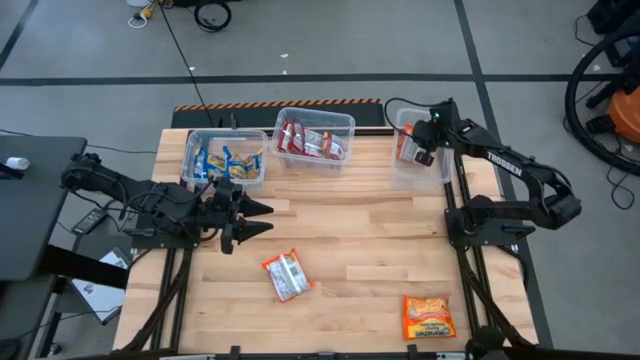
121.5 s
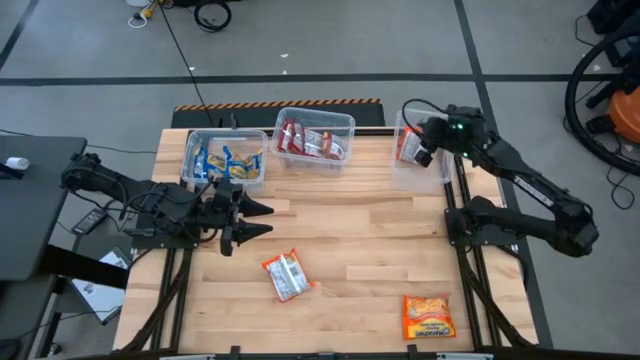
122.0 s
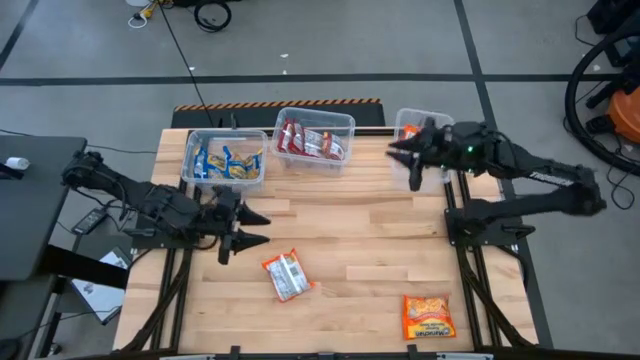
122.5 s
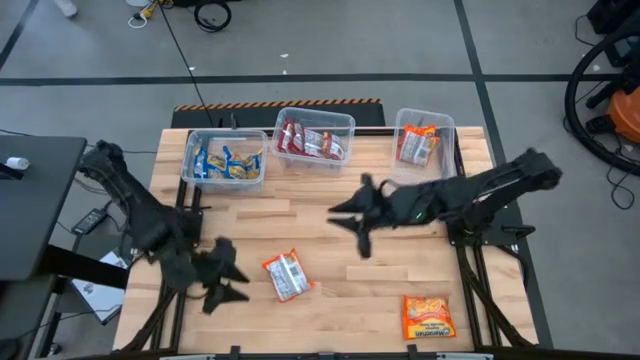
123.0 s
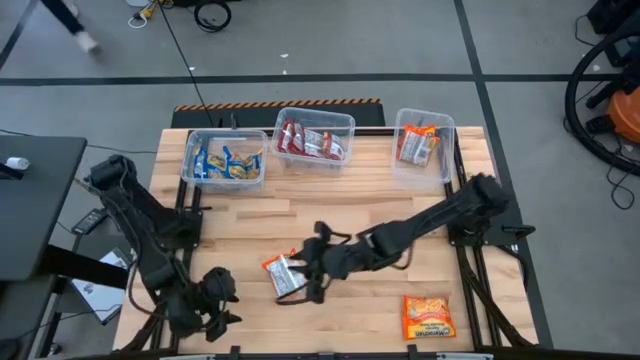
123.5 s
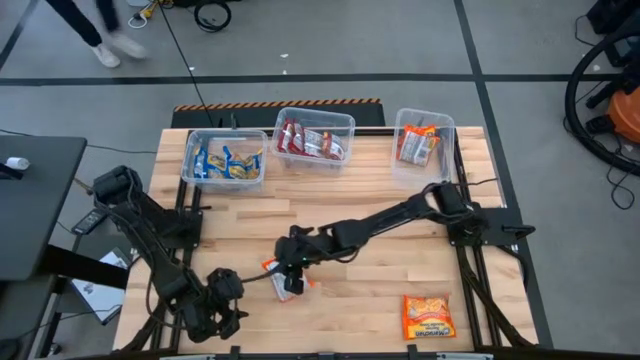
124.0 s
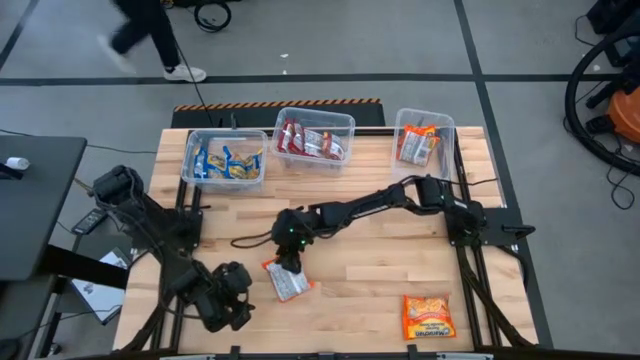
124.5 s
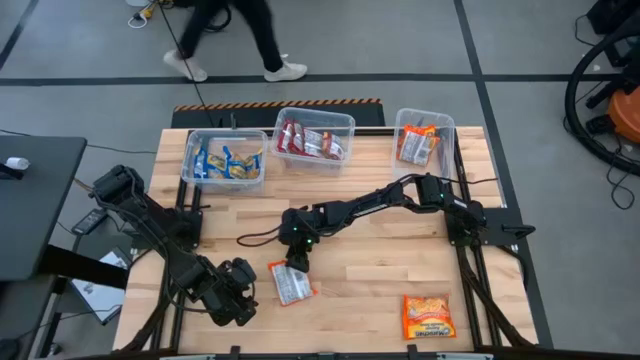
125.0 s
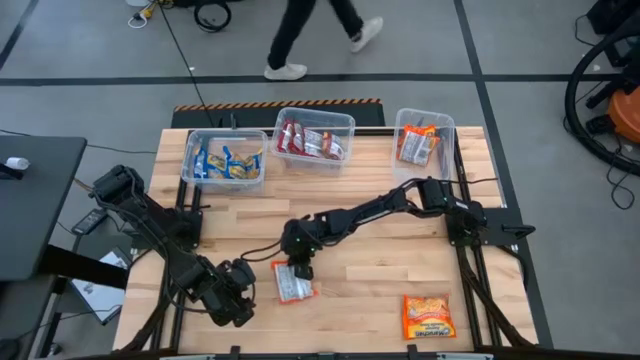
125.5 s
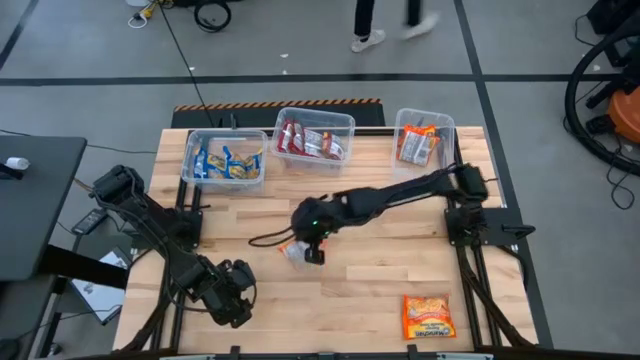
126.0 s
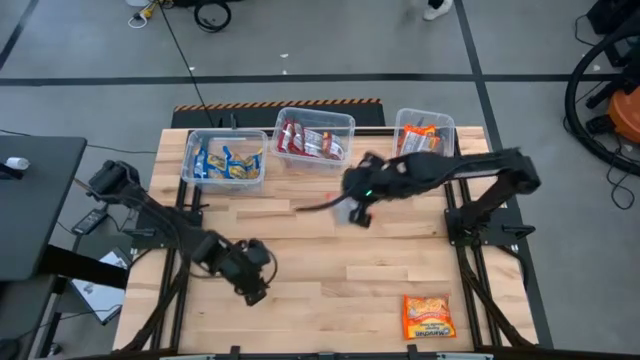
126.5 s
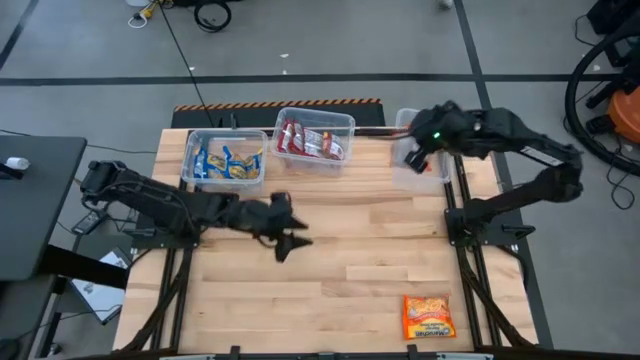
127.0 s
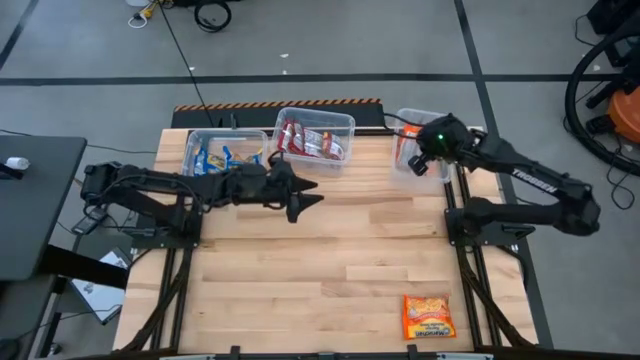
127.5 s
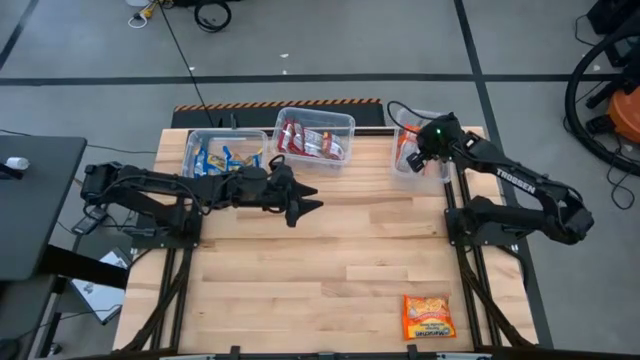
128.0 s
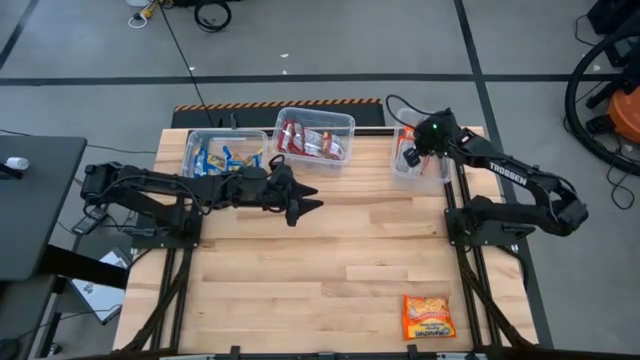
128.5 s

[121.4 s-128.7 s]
Task: Sort Maruchan noodles
Put the left orange noodle pack into the right transparent bin

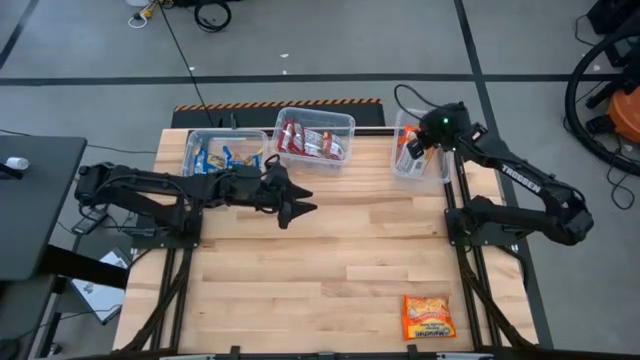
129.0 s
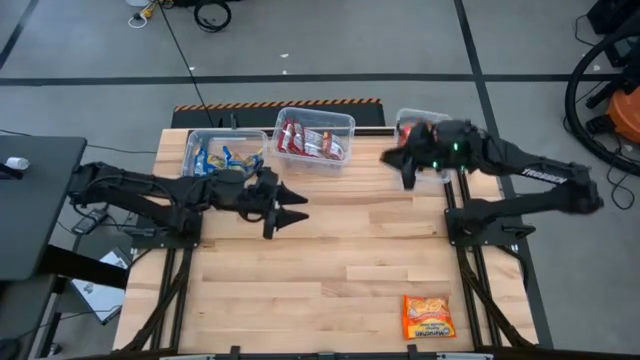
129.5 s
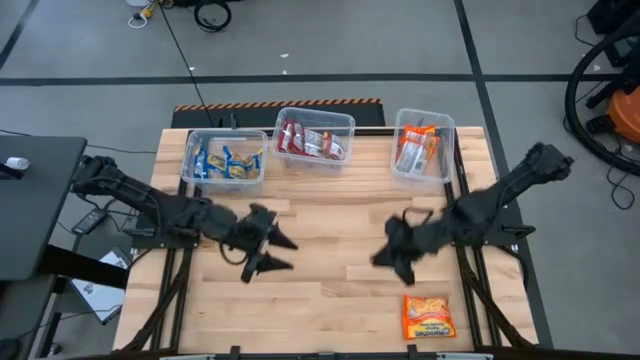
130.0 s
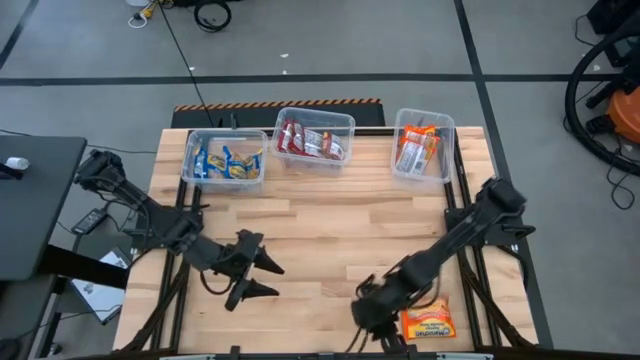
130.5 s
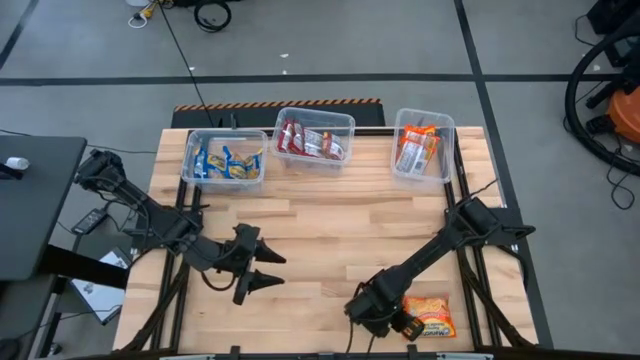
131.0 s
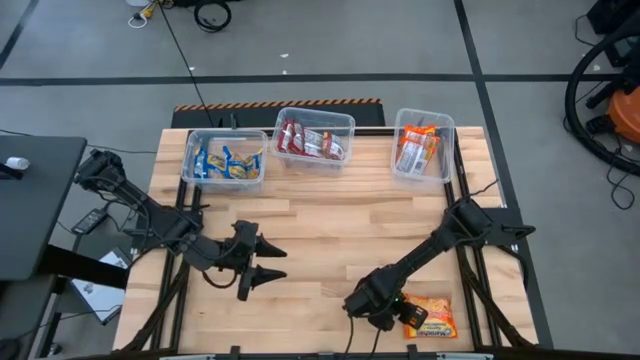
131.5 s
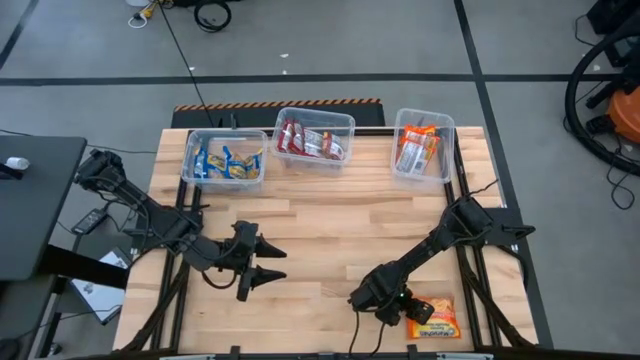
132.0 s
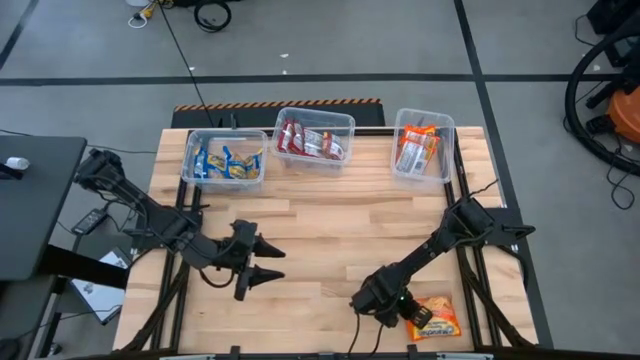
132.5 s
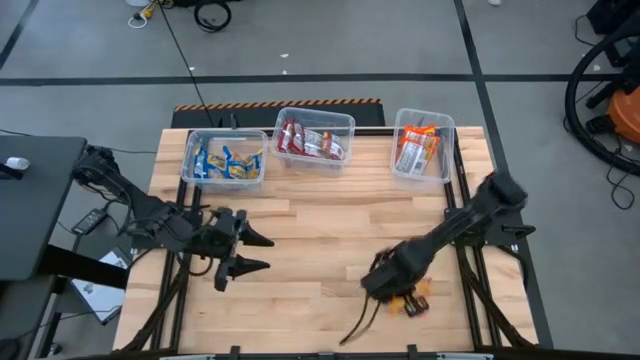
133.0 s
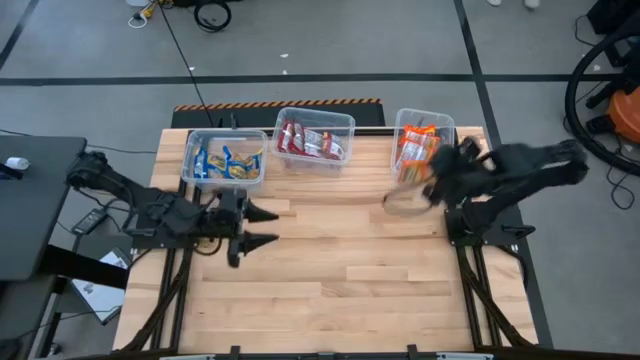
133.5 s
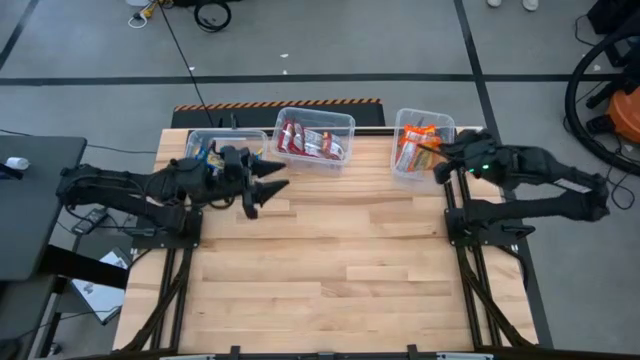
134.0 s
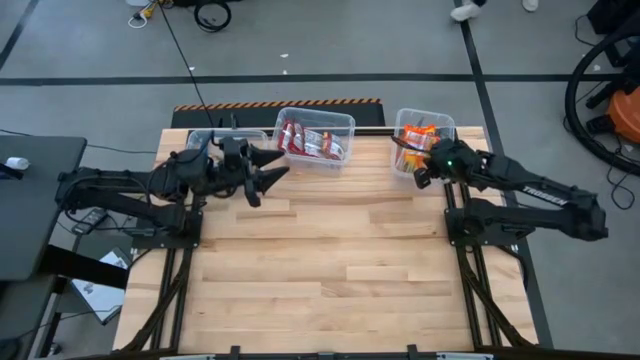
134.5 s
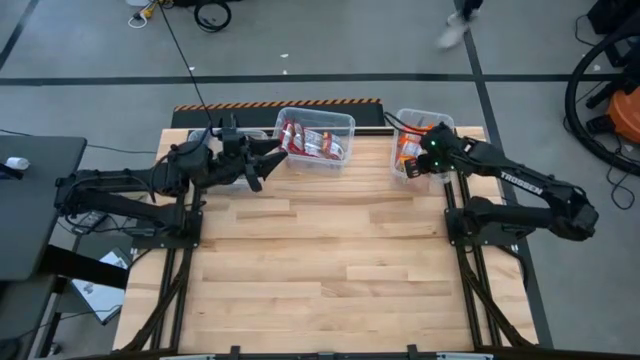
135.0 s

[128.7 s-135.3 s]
Put the right orange noodle pack into the right transparent bin

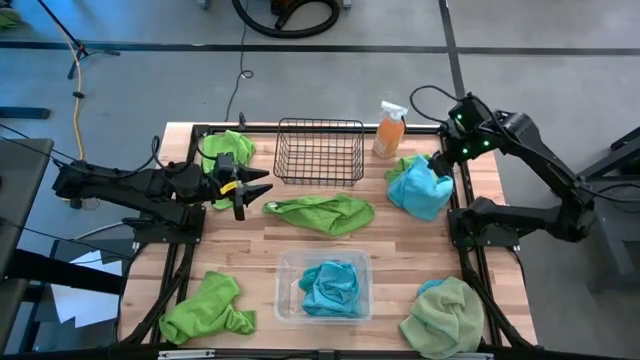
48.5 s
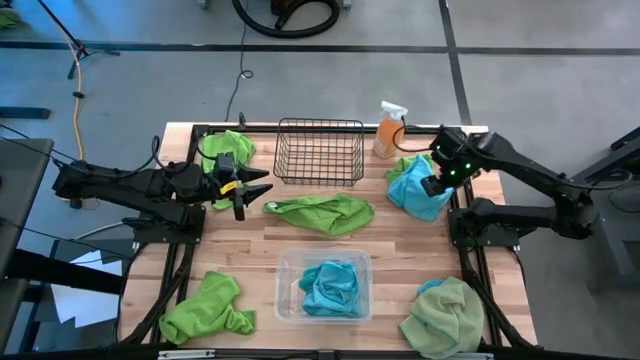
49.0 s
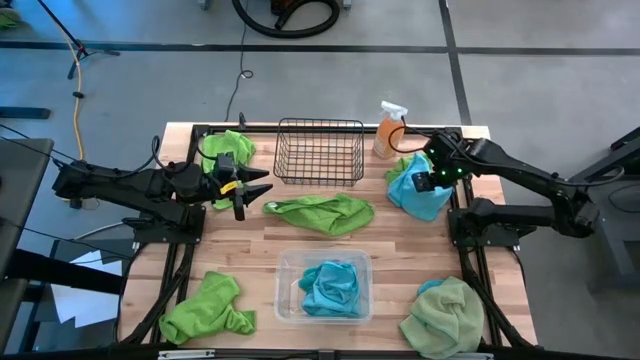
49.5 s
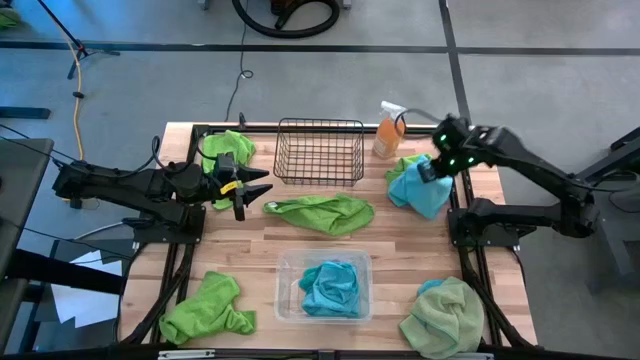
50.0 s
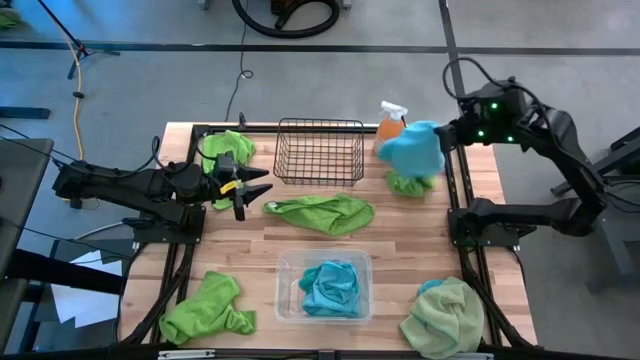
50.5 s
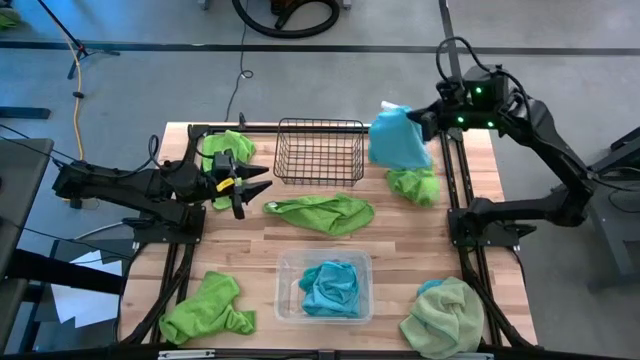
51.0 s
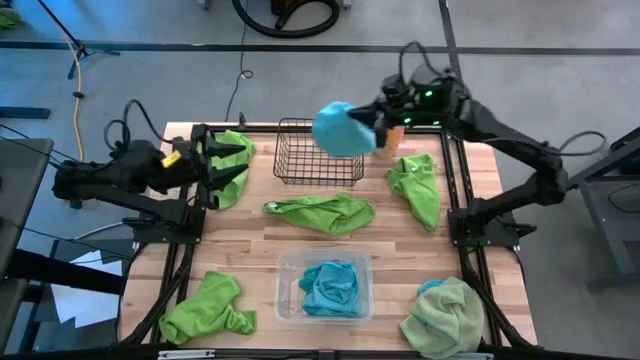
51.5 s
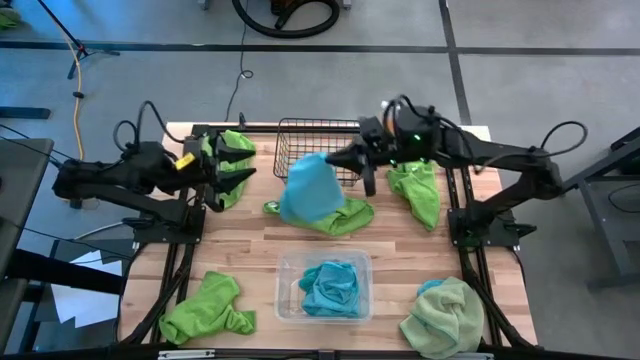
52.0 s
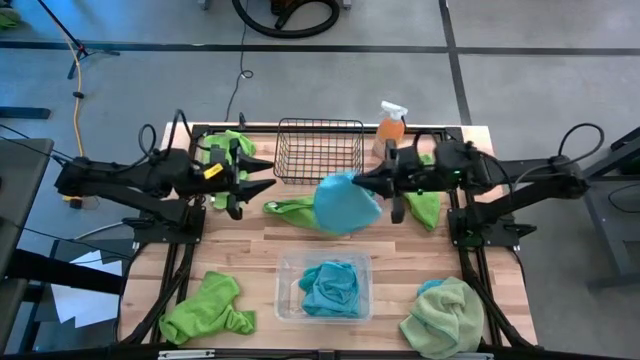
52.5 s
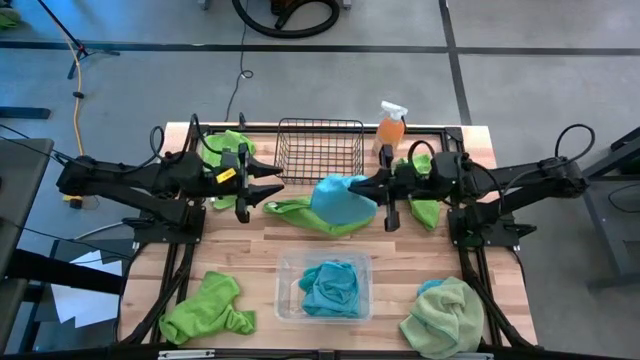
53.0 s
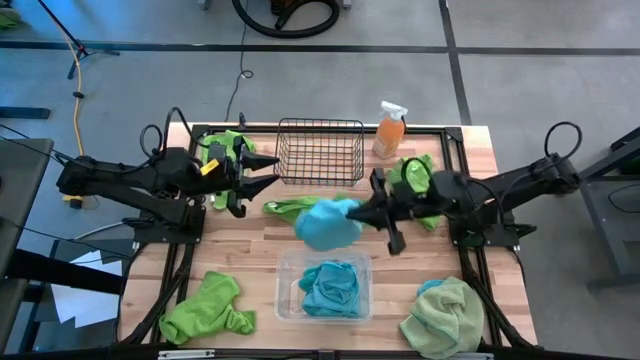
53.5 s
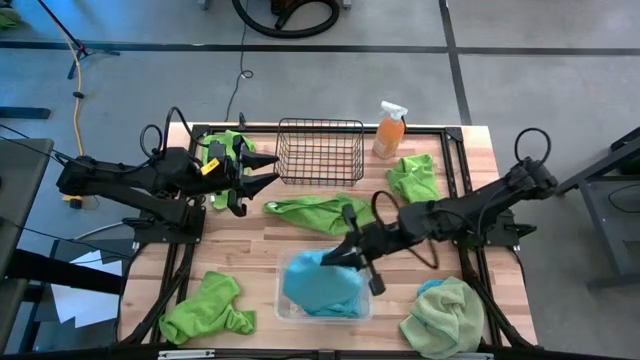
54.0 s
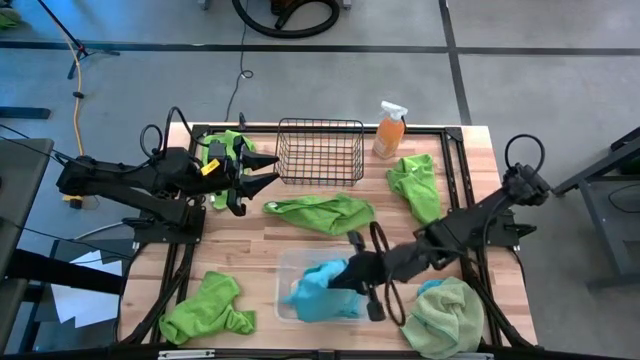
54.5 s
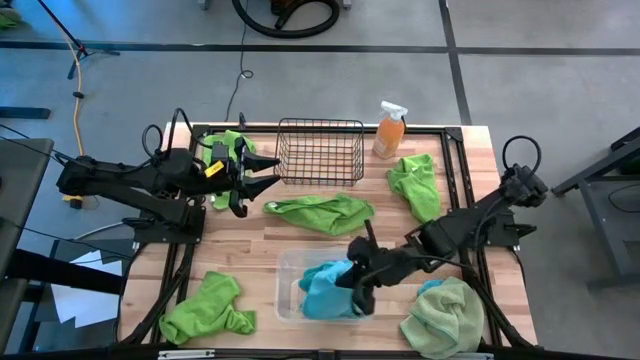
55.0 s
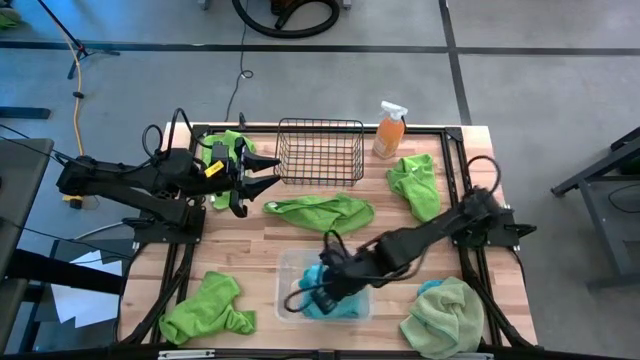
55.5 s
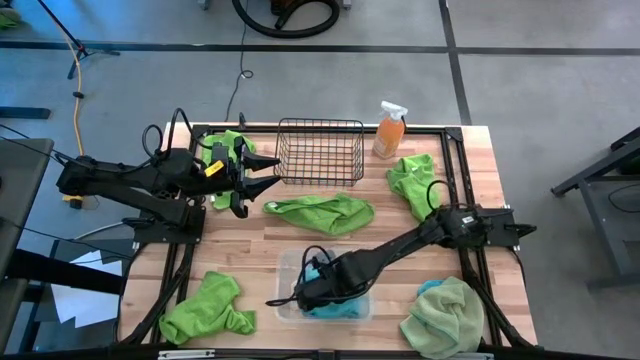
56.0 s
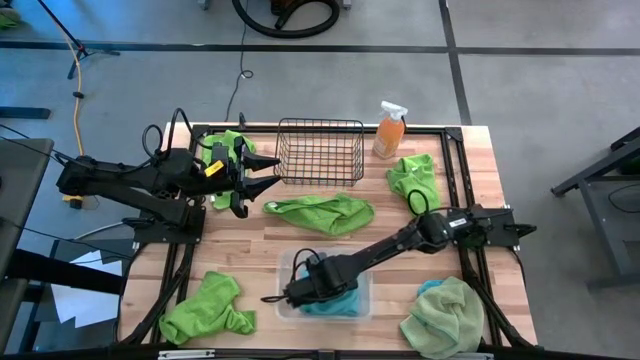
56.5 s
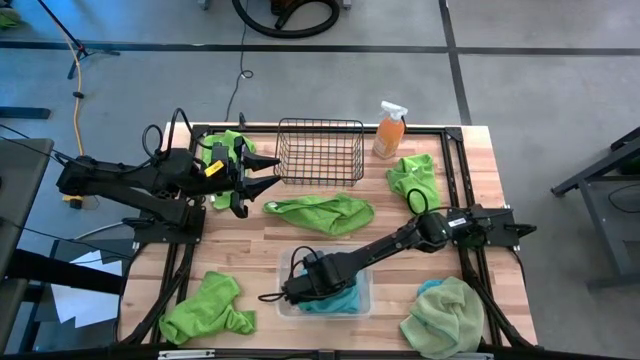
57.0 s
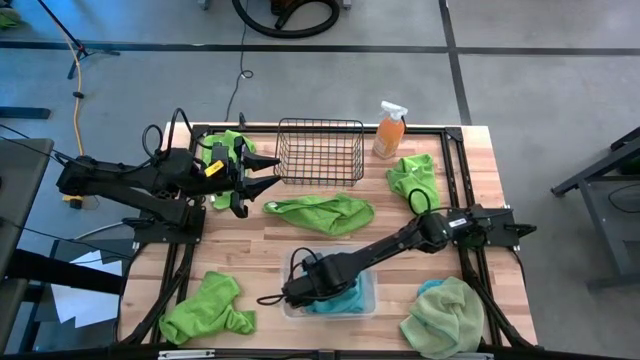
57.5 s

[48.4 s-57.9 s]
Task: Sort microfiber towel by color & place in baskets
Put the top right blue towel into the transparent bin
